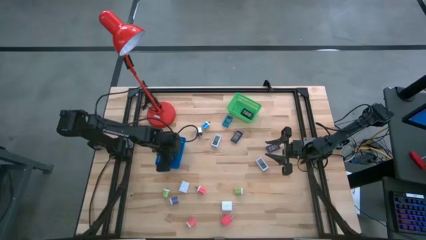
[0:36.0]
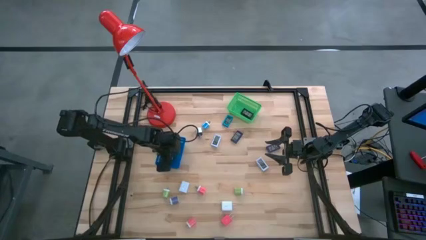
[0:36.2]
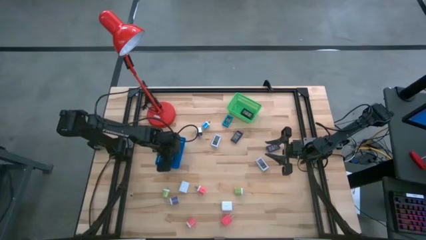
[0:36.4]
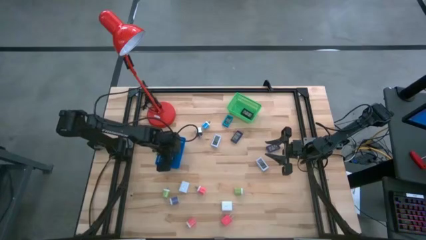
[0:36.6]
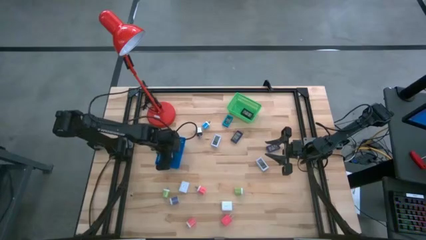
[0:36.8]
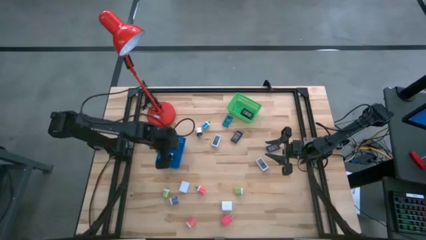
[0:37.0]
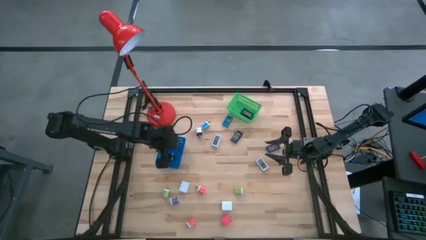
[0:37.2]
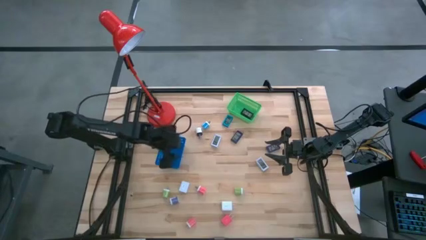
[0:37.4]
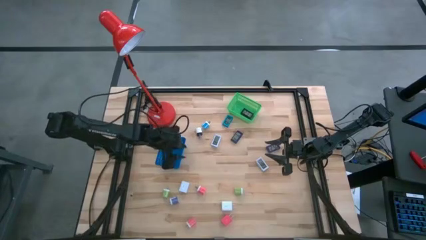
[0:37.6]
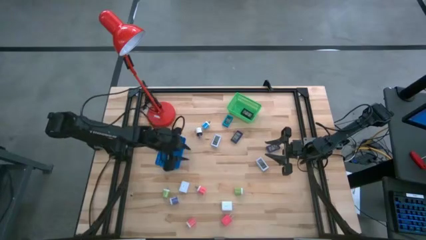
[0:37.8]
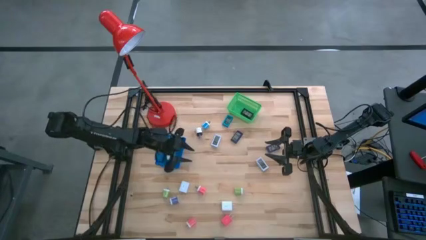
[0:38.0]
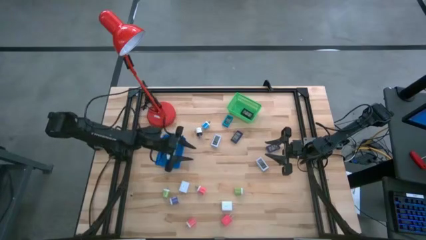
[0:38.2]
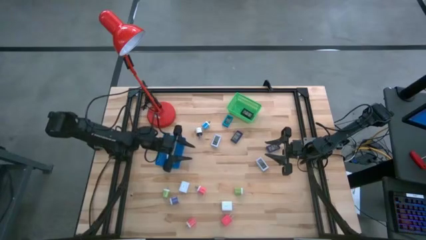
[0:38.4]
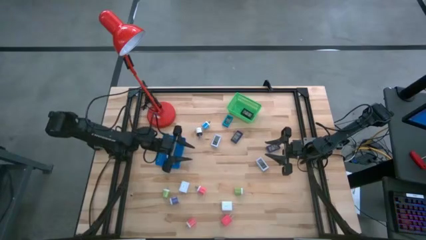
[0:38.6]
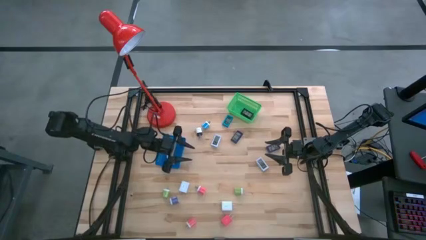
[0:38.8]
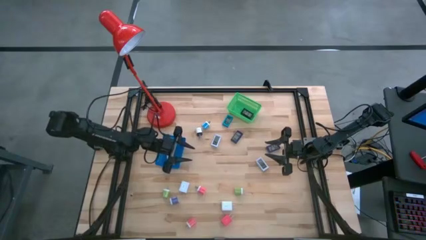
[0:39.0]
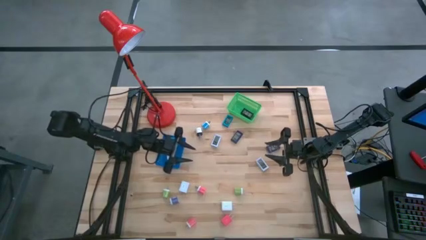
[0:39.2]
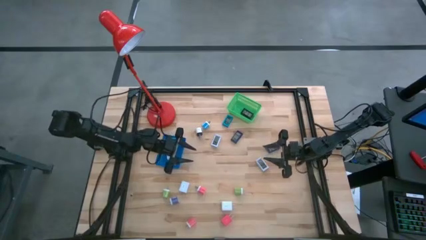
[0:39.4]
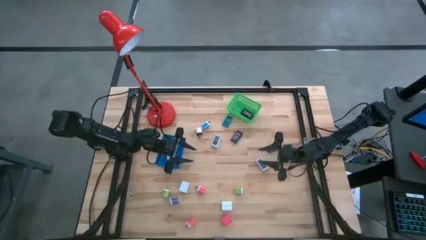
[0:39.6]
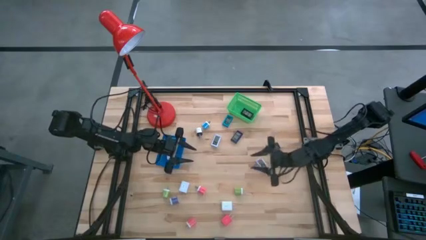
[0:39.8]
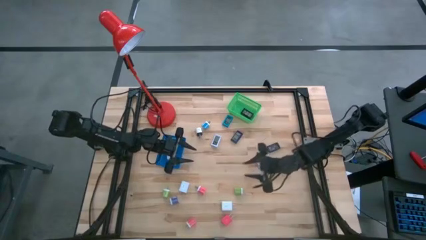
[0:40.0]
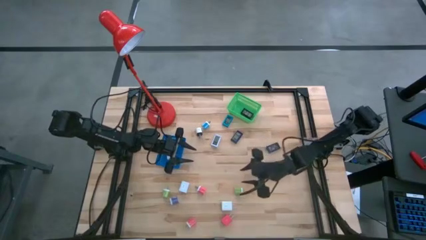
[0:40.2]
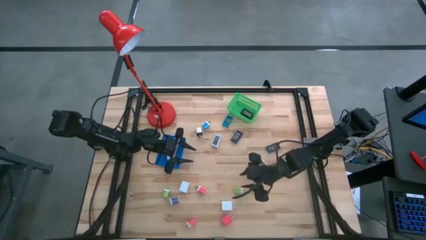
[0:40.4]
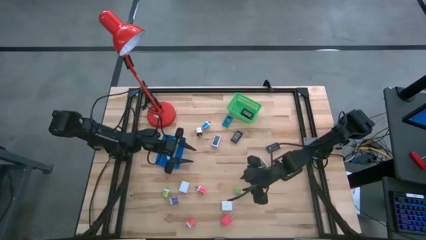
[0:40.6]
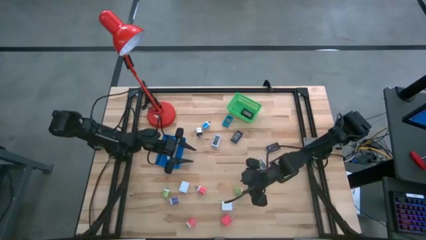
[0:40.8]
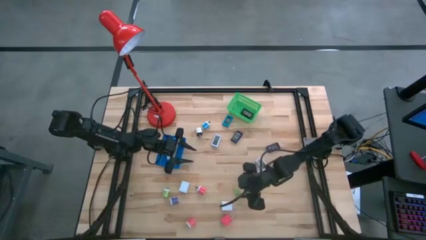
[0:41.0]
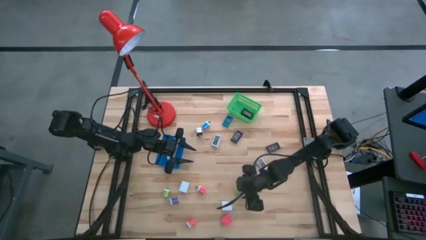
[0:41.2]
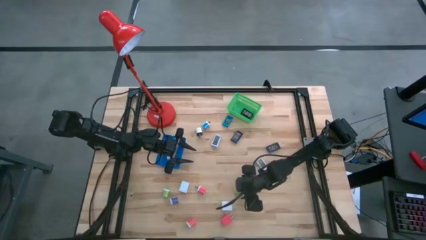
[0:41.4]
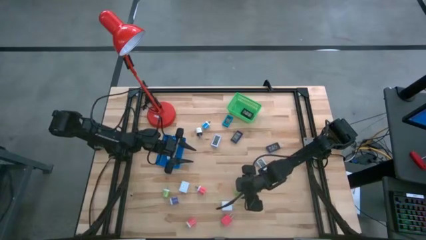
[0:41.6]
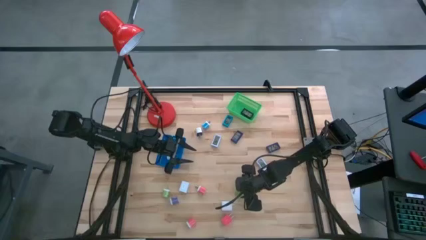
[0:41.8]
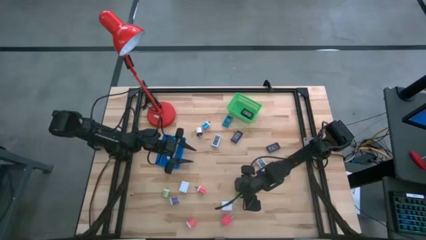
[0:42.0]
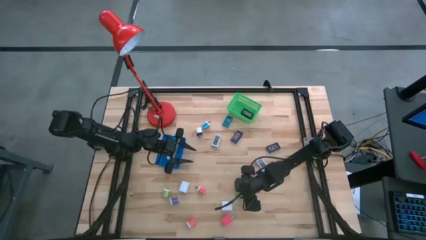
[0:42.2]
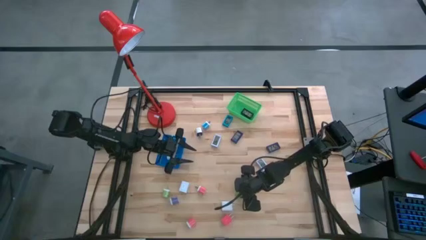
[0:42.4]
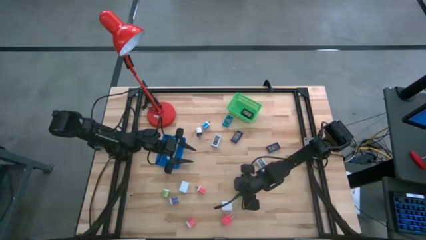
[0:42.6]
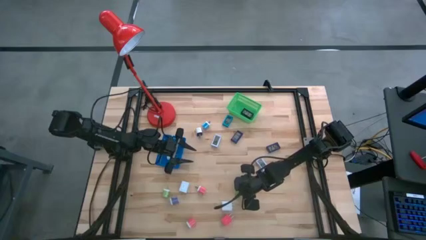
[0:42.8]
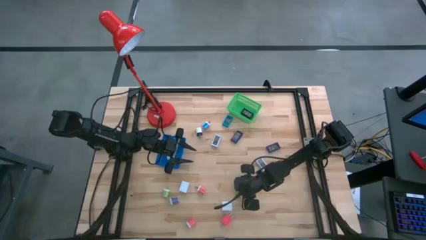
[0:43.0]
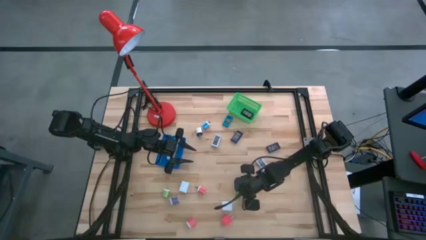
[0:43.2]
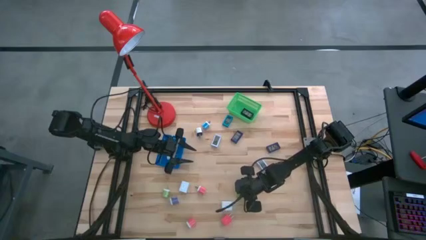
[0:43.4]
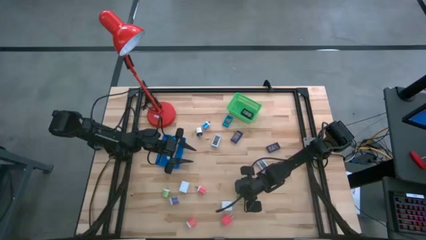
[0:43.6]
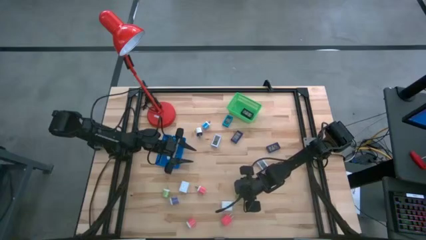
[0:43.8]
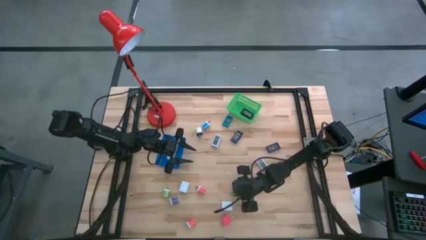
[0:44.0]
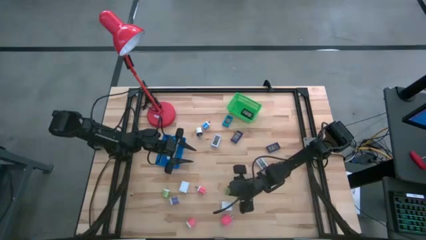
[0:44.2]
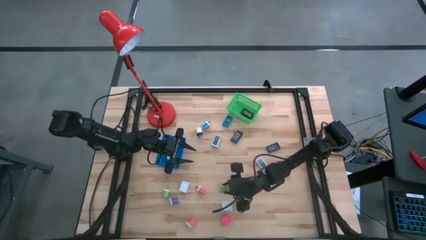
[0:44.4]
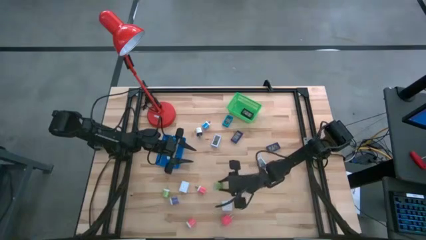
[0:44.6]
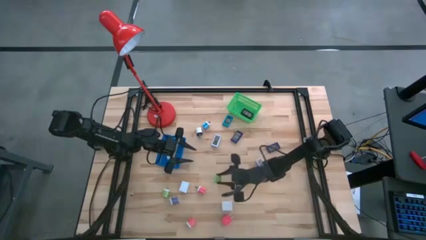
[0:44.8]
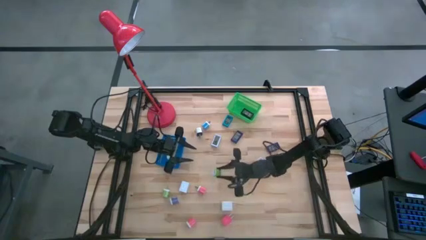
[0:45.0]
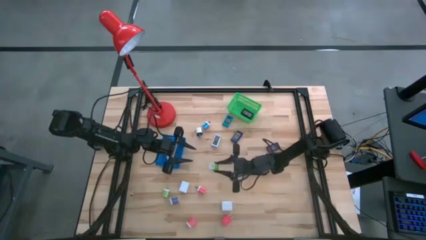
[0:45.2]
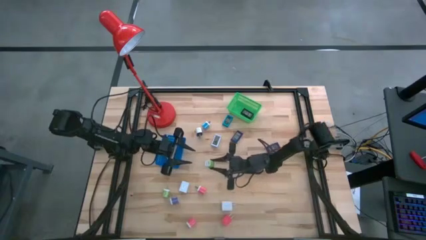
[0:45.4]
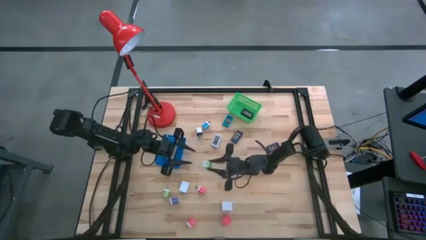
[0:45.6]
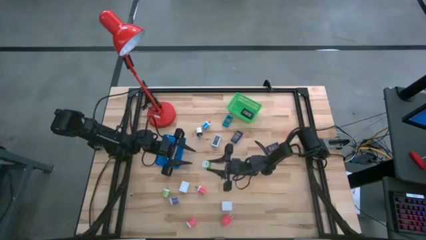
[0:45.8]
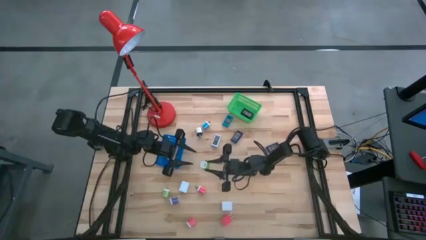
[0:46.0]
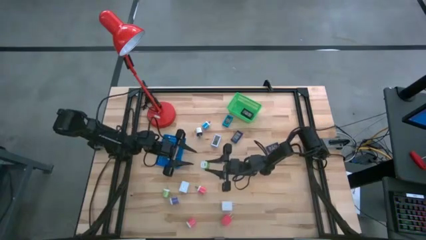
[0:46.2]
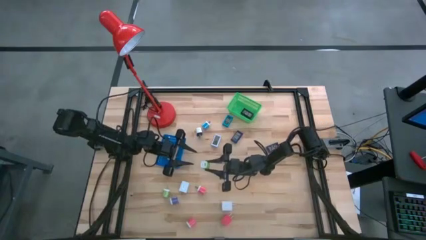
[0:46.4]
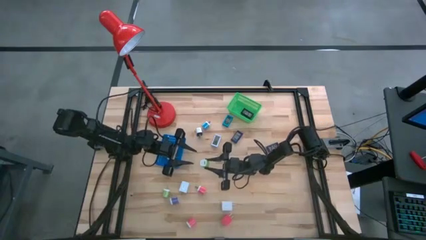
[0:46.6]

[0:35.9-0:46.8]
Task: Pick & Place Office items
Put the right green charger adapter into the blue basket
